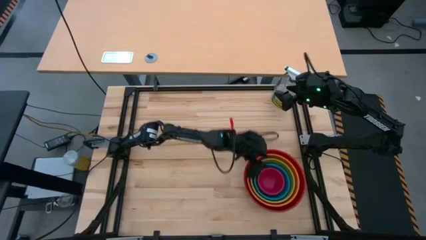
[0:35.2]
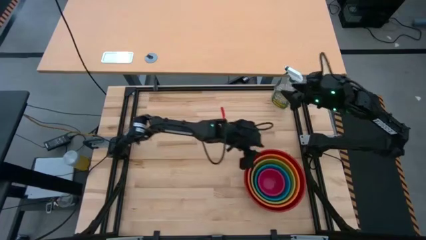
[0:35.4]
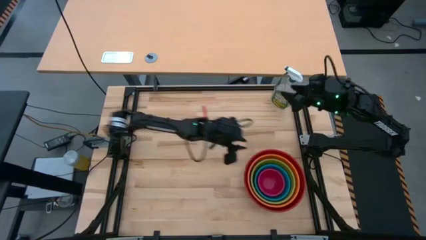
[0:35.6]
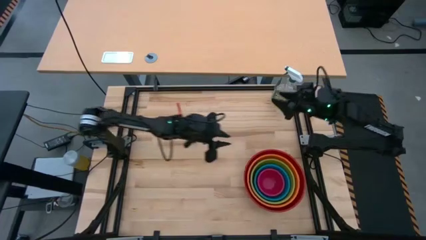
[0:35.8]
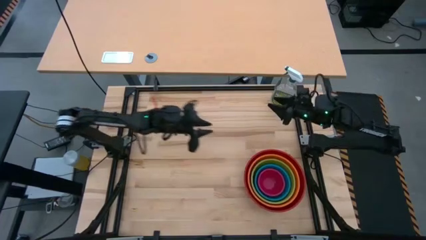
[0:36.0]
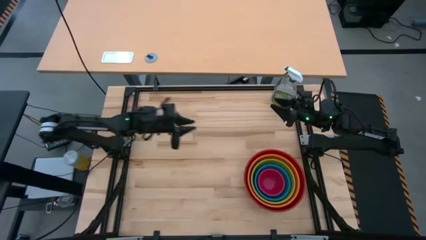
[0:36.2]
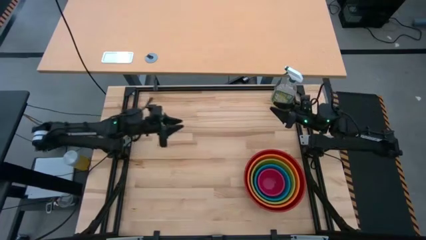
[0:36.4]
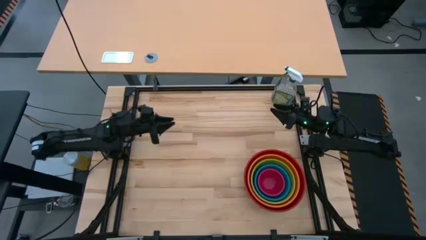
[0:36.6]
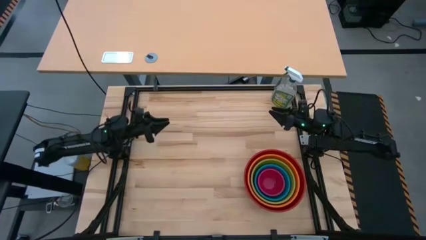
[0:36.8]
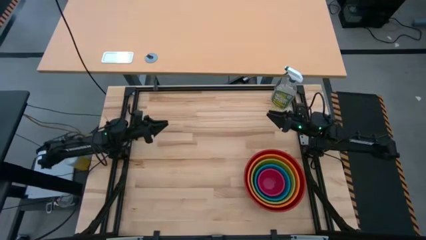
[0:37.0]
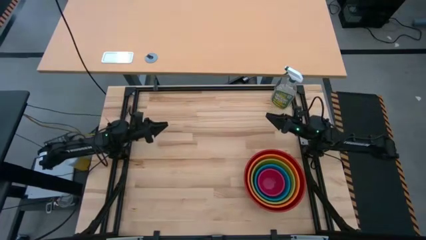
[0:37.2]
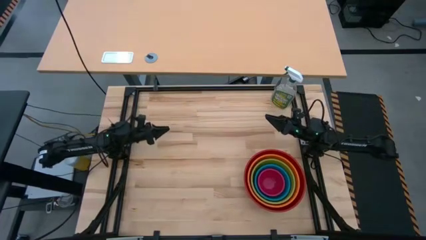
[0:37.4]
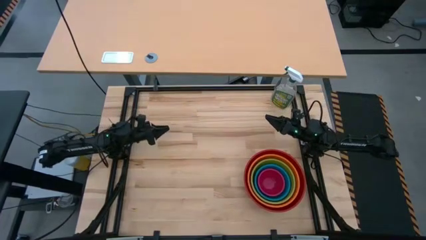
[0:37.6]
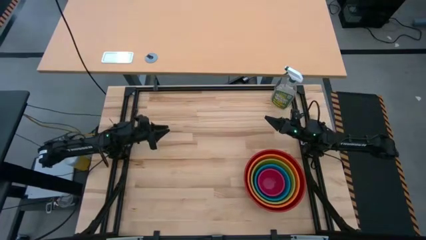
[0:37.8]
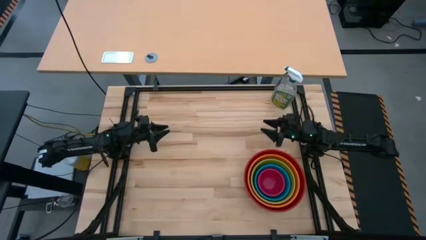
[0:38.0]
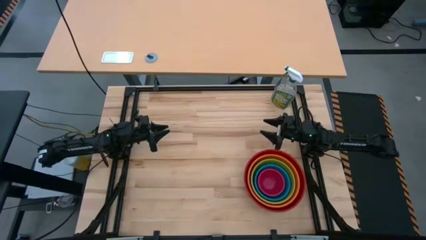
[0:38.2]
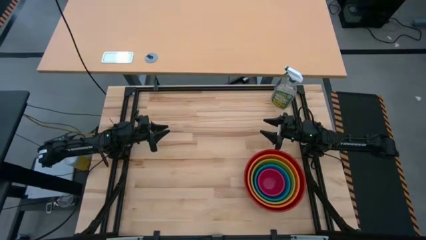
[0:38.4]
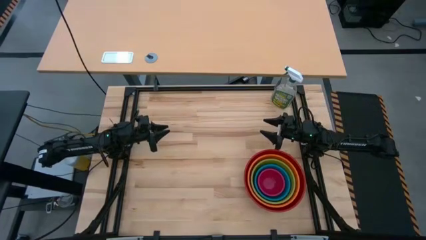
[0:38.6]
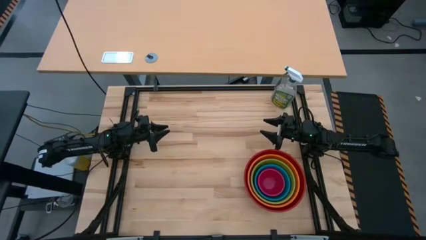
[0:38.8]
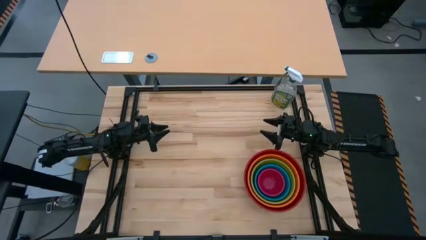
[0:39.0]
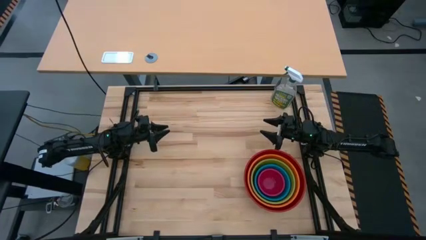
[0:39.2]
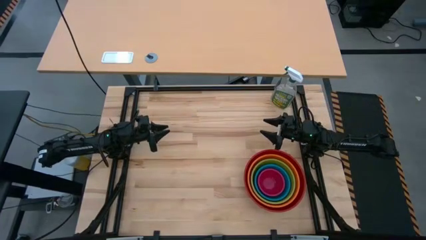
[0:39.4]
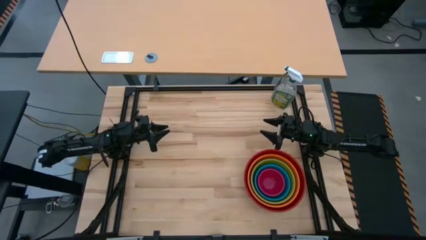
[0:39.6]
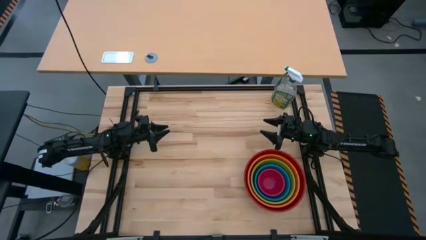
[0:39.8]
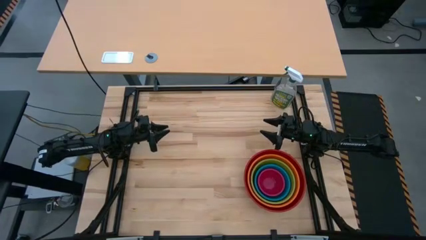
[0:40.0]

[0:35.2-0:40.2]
Return to Home Position

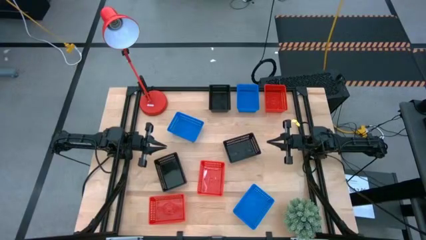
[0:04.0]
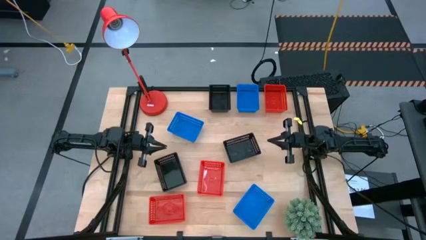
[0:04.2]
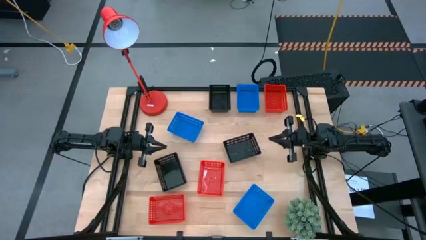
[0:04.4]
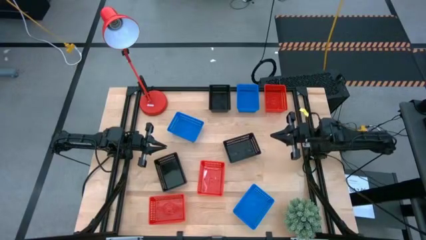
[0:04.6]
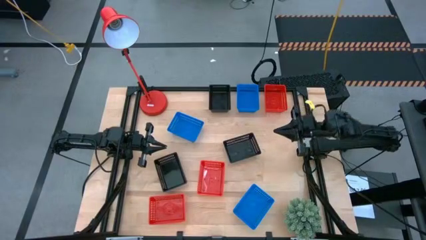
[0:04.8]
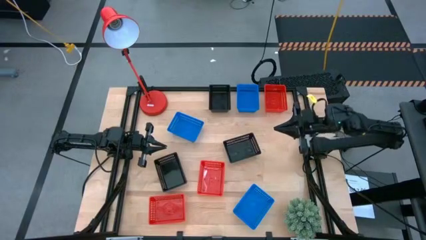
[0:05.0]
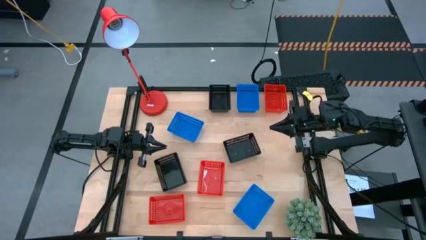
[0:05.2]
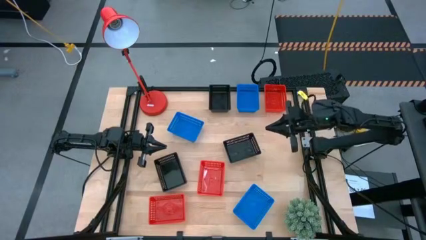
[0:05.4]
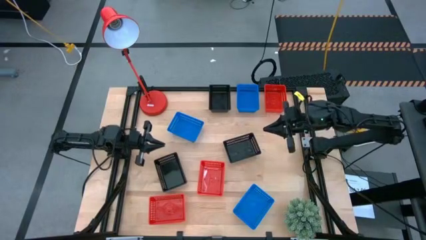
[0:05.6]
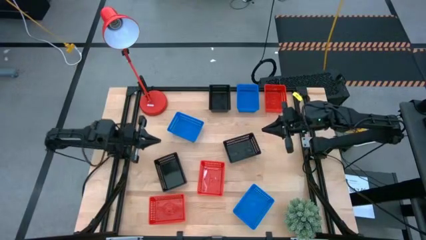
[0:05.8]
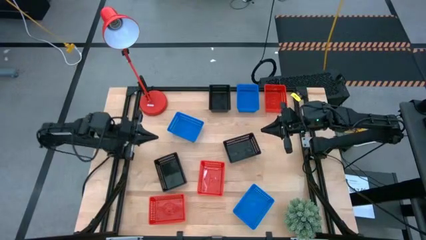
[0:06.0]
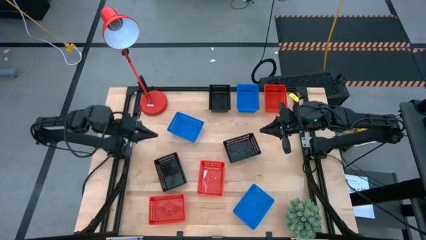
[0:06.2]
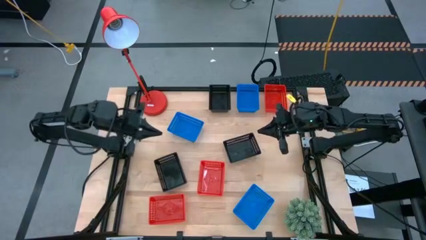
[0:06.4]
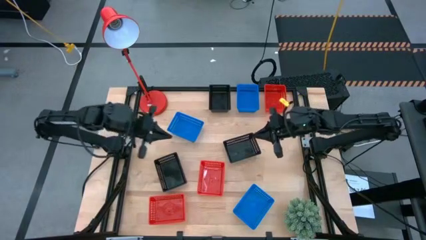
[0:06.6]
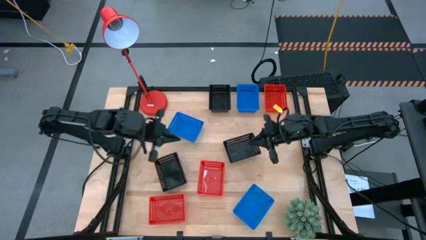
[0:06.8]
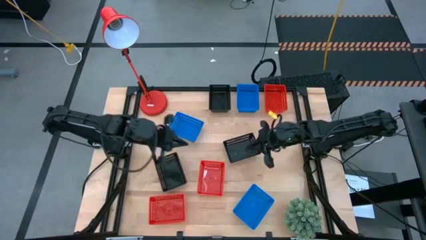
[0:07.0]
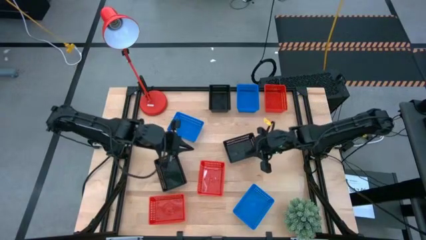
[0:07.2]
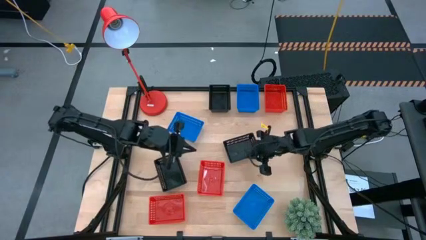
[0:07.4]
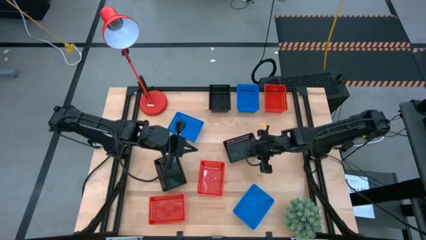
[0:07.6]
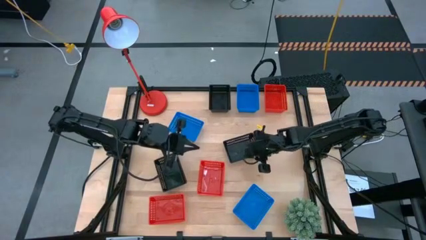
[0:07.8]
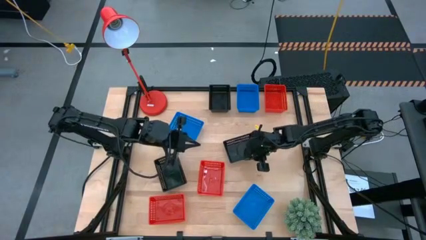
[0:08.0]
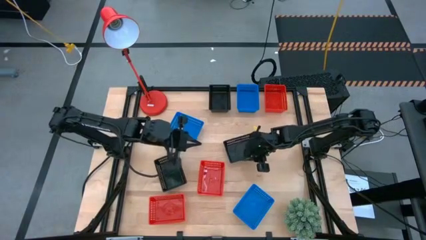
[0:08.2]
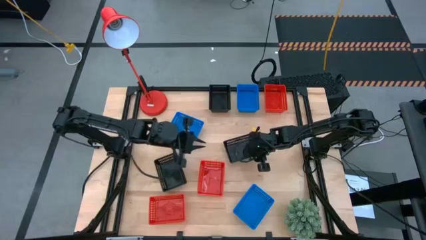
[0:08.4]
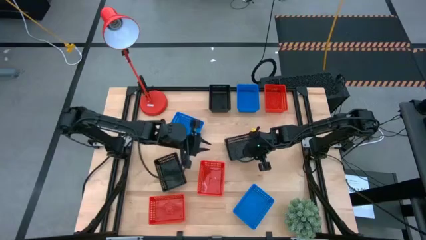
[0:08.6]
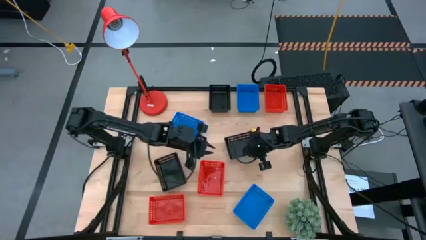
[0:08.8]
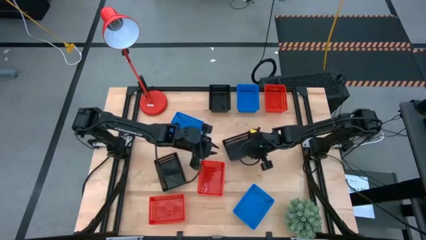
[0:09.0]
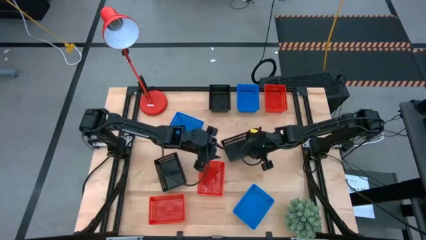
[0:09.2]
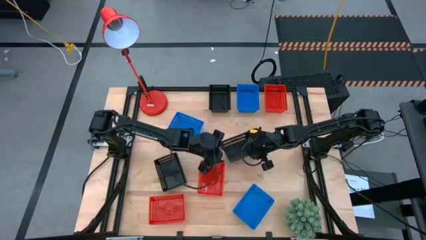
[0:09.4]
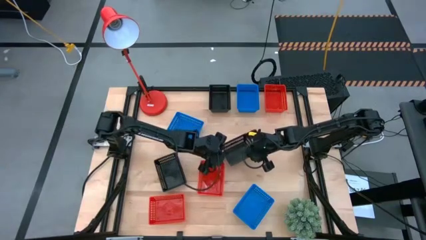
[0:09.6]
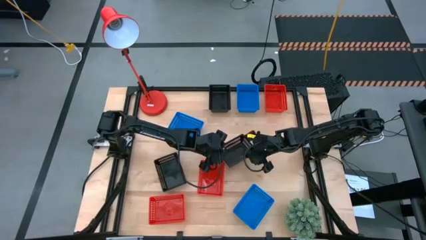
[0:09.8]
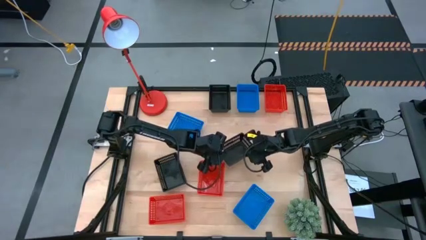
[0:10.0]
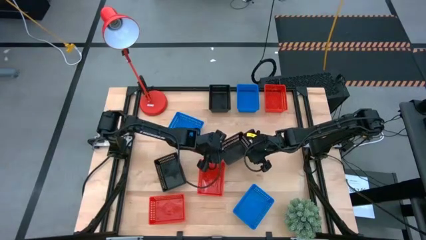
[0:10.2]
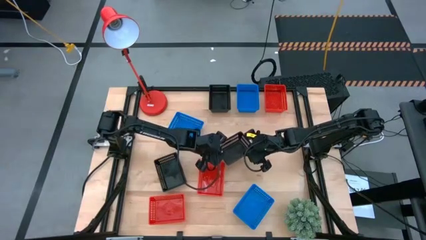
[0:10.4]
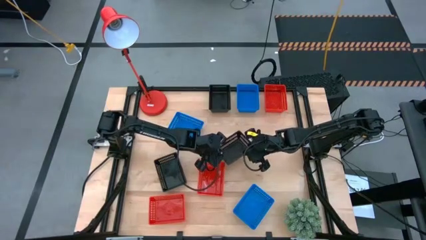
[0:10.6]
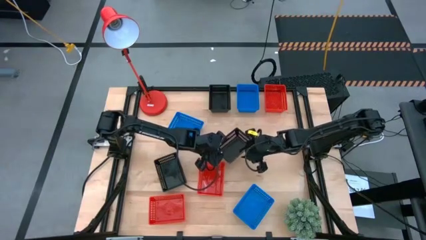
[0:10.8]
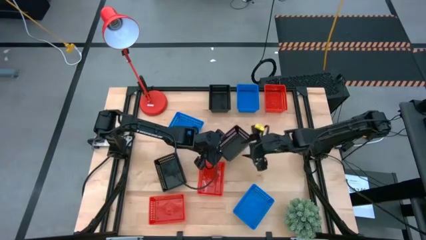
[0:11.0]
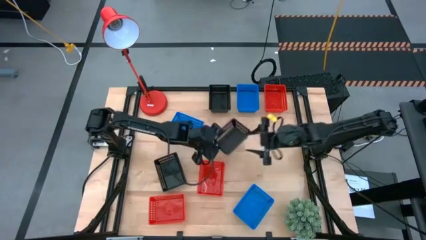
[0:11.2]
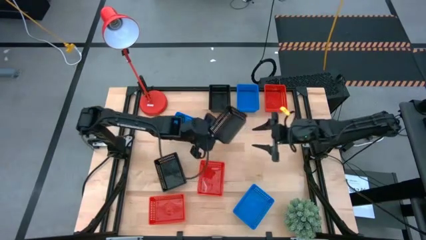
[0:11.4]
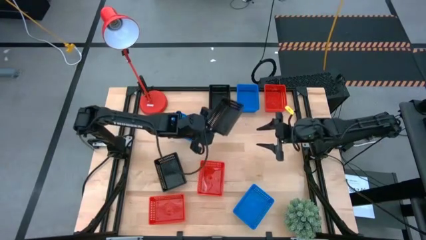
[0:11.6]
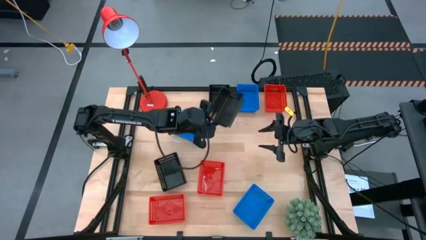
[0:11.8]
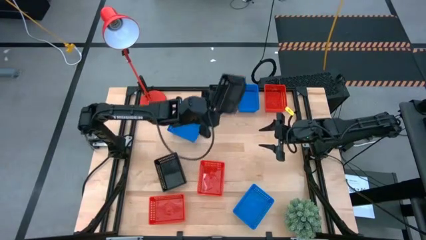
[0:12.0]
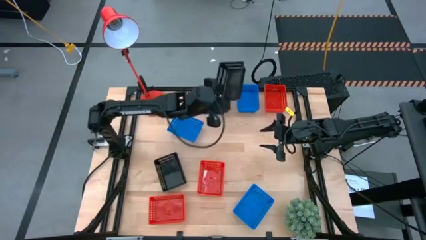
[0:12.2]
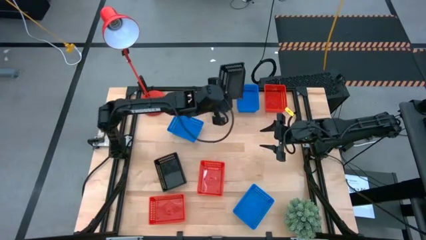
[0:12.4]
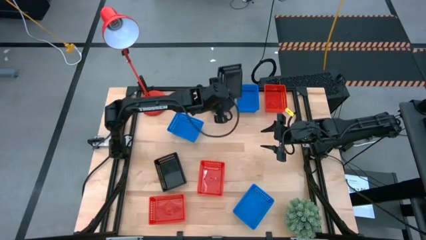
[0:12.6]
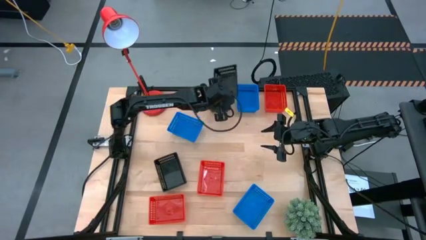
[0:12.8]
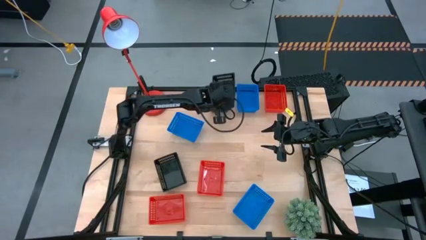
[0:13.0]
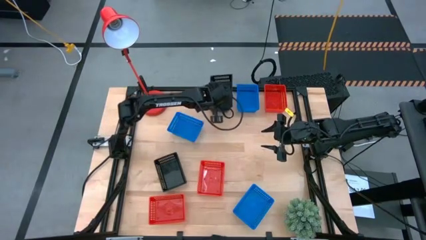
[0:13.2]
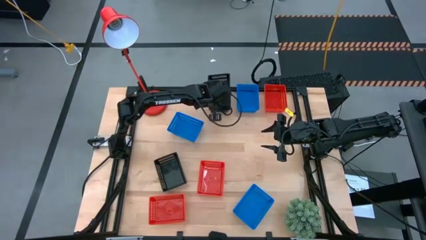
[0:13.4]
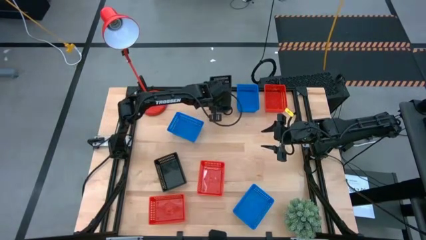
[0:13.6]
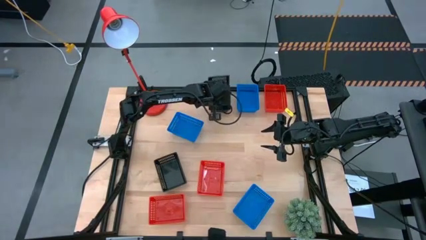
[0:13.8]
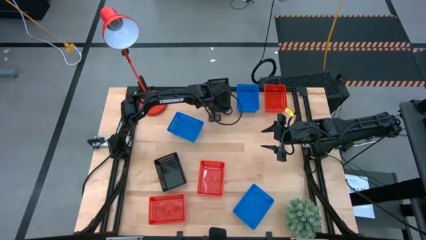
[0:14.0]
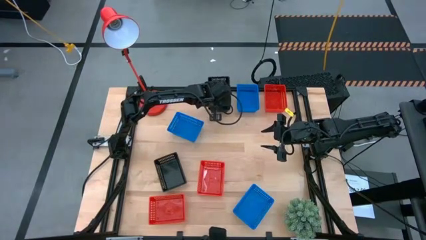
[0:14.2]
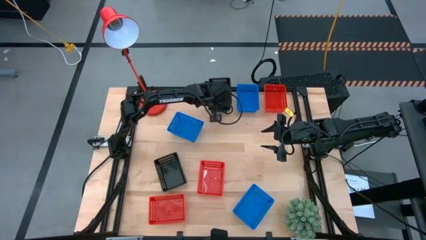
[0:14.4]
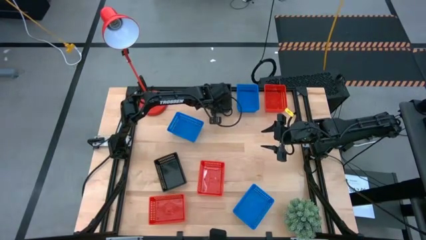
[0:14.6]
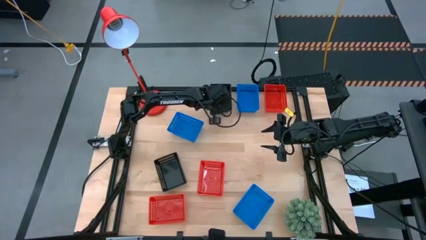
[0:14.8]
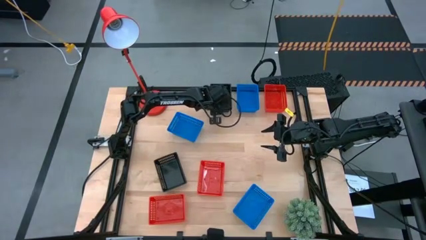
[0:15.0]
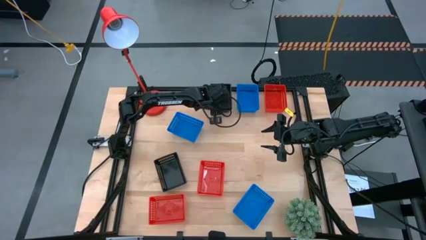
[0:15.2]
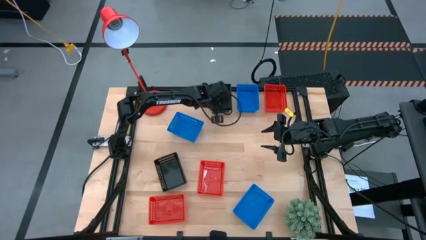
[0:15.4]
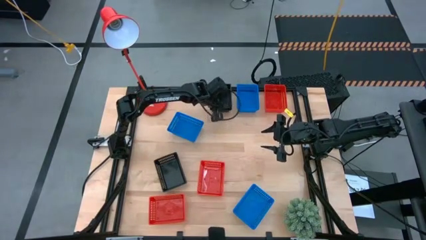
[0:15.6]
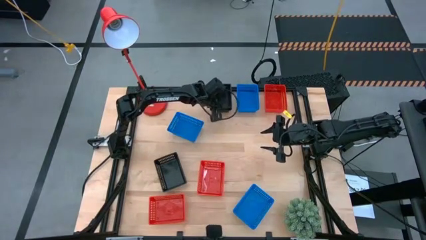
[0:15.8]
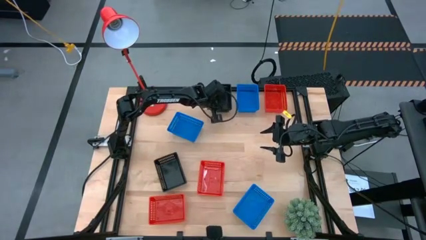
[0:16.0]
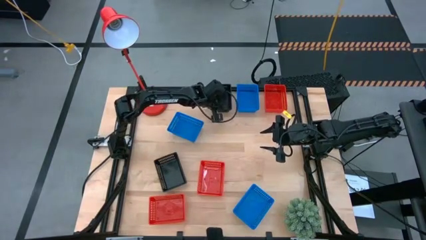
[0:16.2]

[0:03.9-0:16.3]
Stack the middle black basket on top of the top black basket
